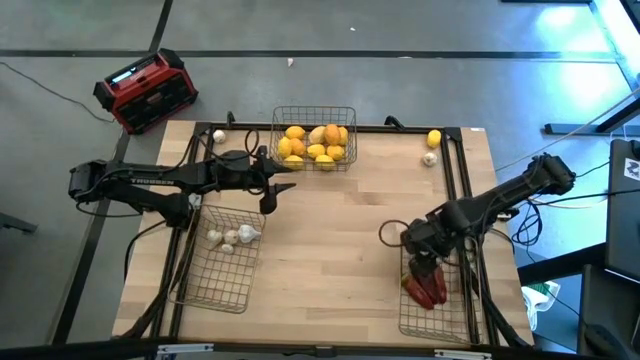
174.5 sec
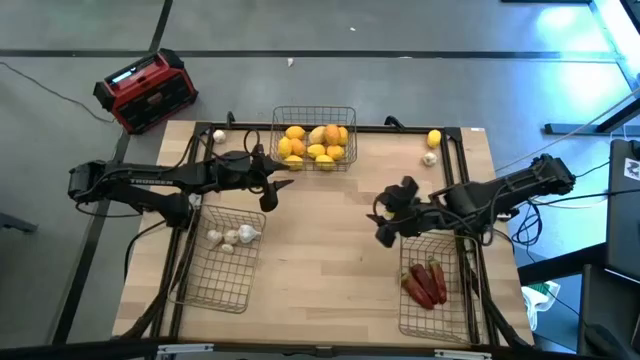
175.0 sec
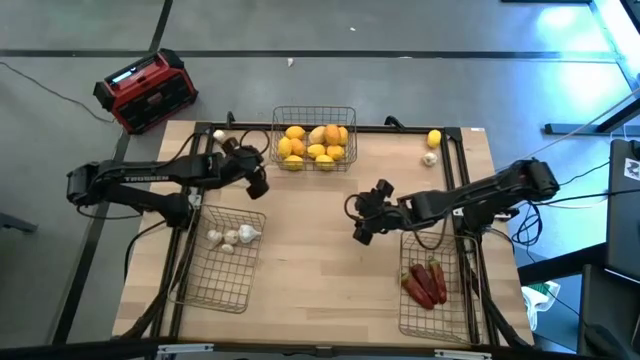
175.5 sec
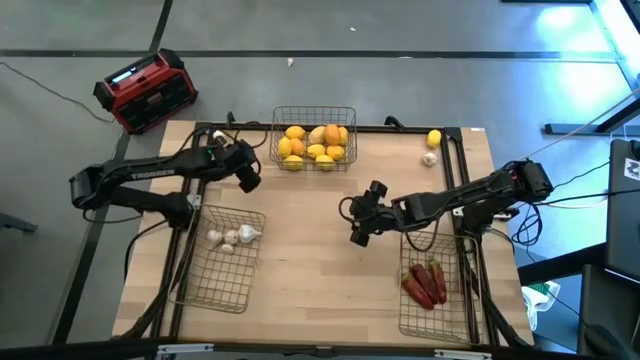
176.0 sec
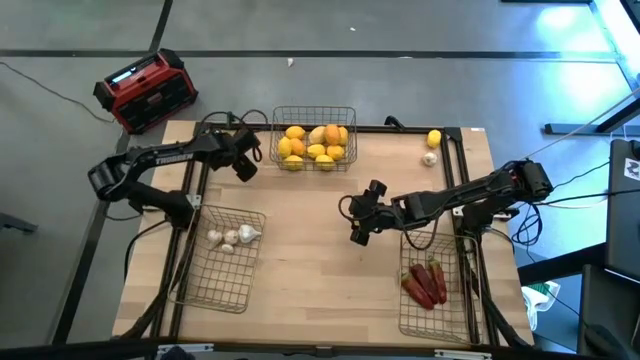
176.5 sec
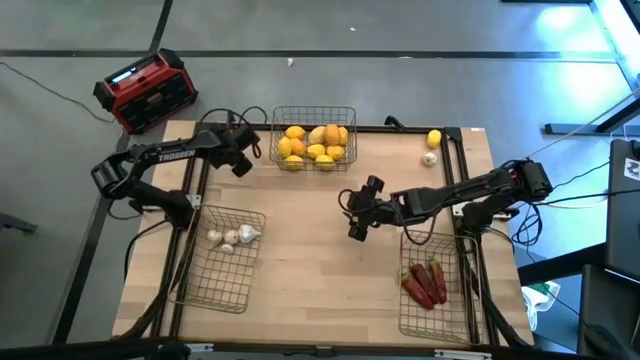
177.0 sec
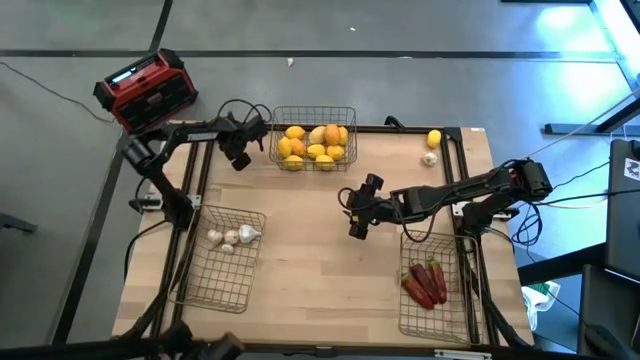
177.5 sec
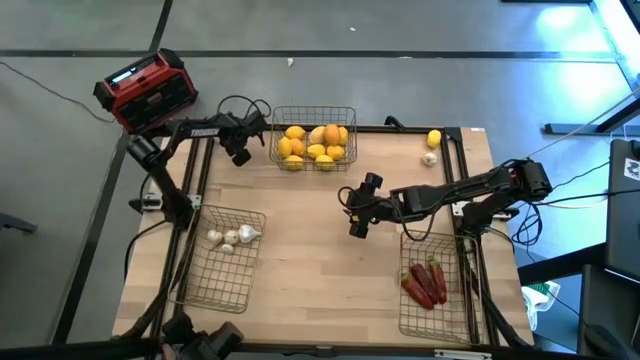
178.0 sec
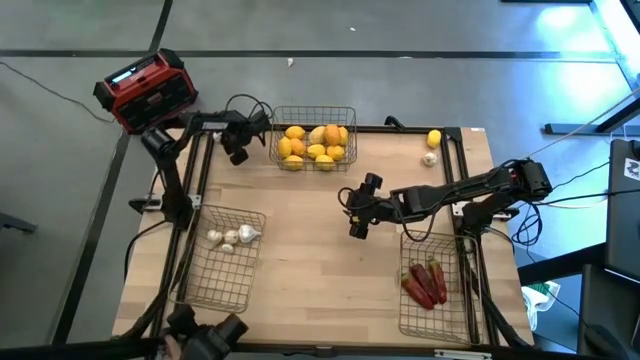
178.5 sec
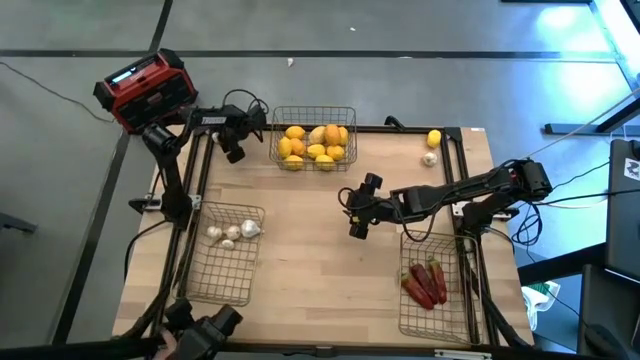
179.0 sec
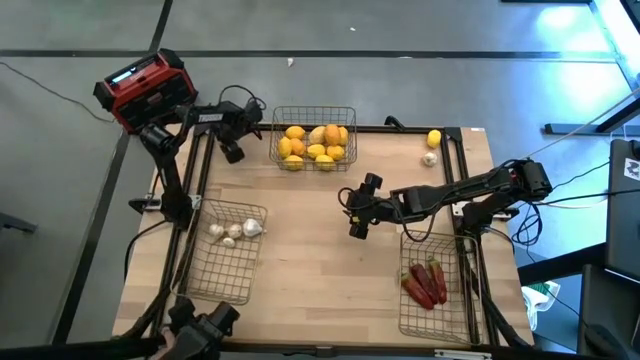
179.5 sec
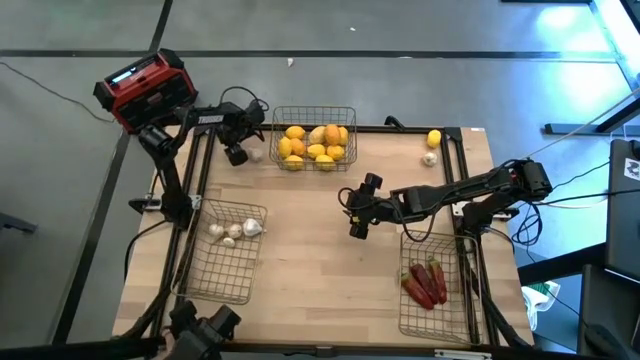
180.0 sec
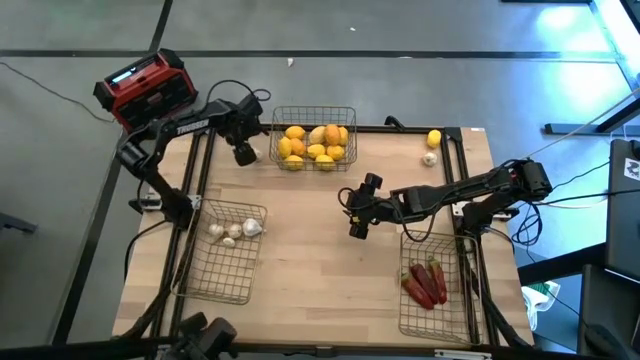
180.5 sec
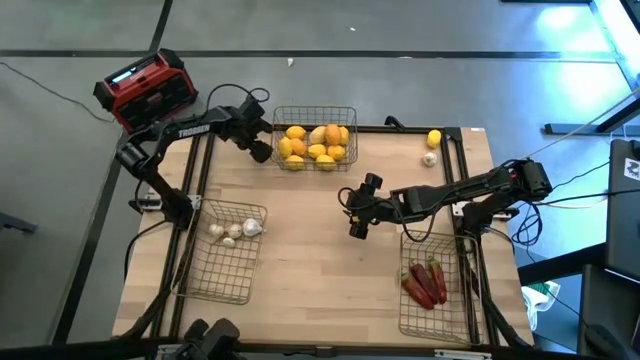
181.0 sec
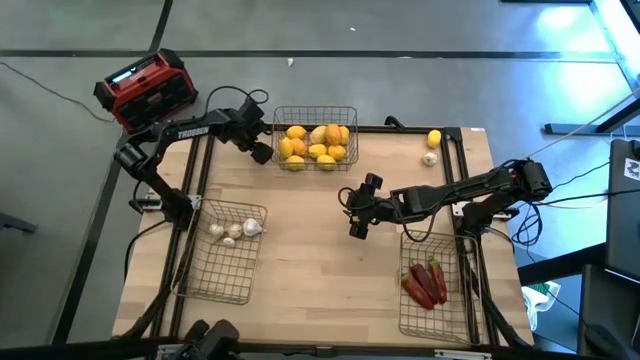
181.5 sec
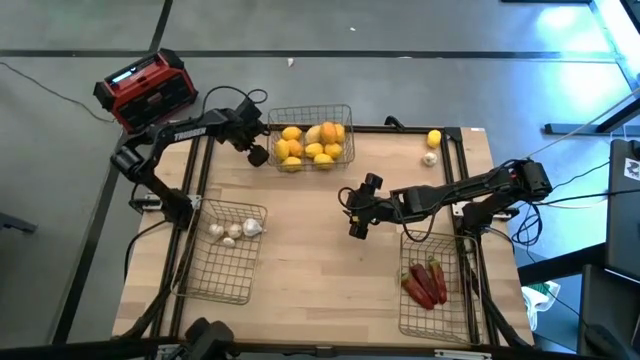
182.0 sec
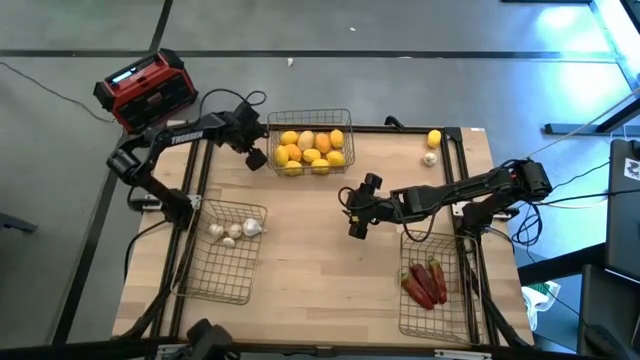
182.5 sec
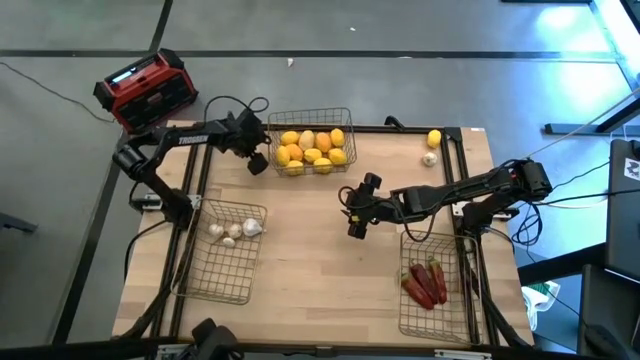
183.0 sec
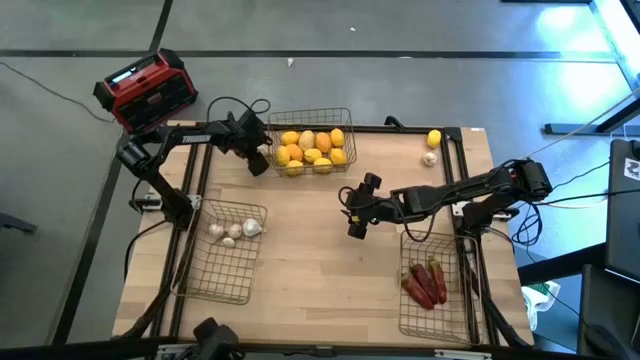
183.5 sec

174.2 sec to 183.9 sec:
Task: Sort produce into baskets
Put the garlic into the bottom left wire basket

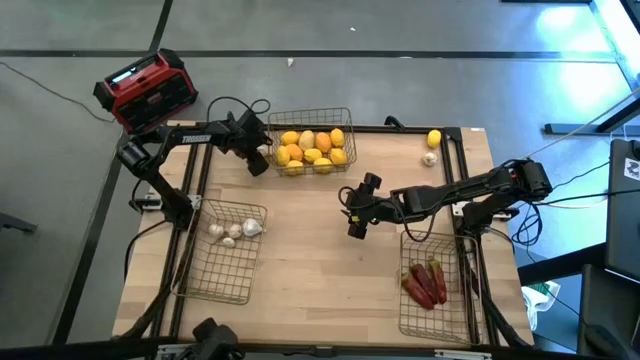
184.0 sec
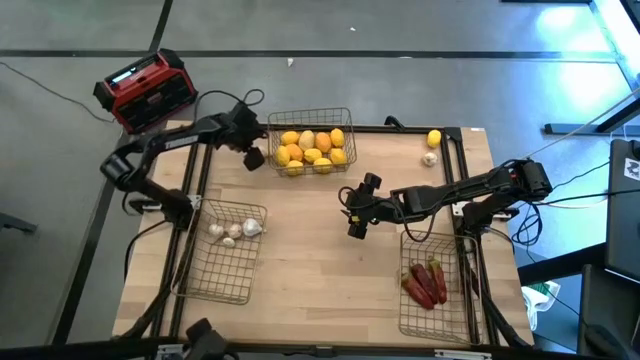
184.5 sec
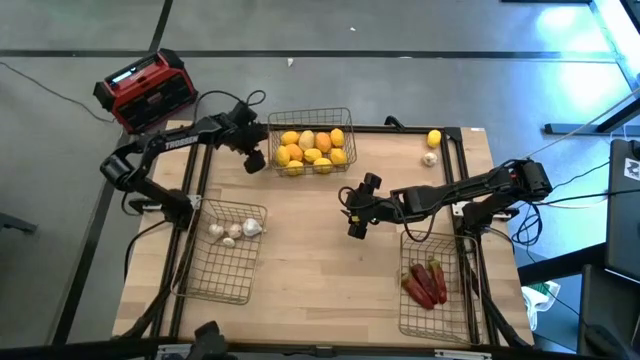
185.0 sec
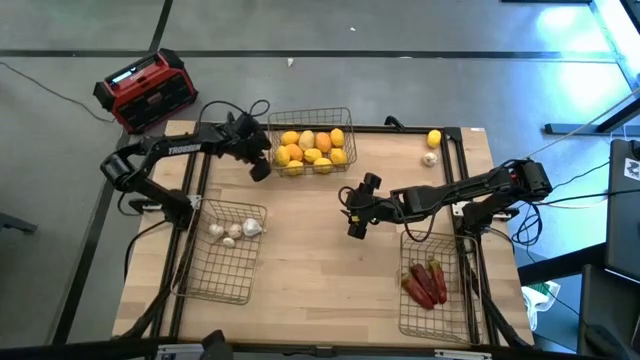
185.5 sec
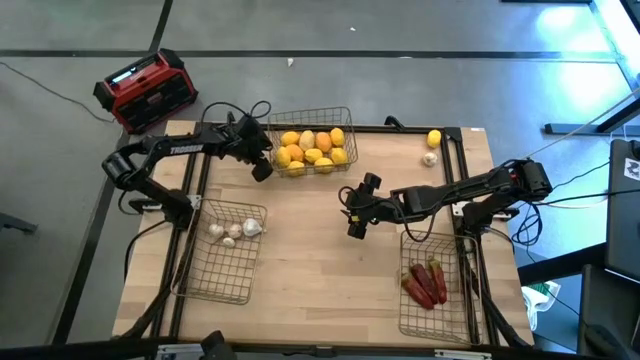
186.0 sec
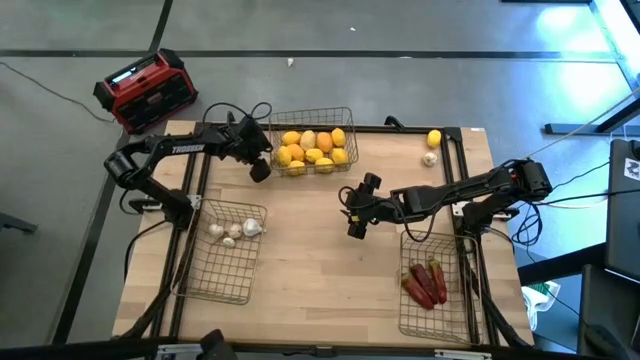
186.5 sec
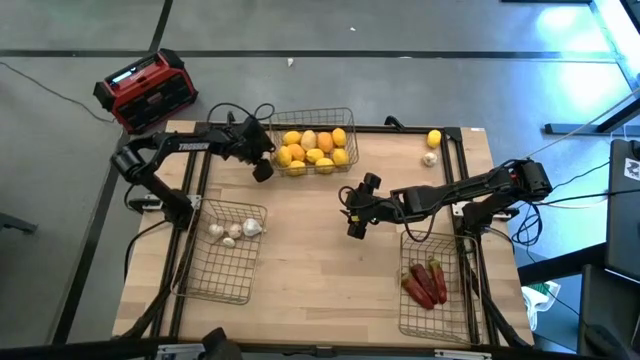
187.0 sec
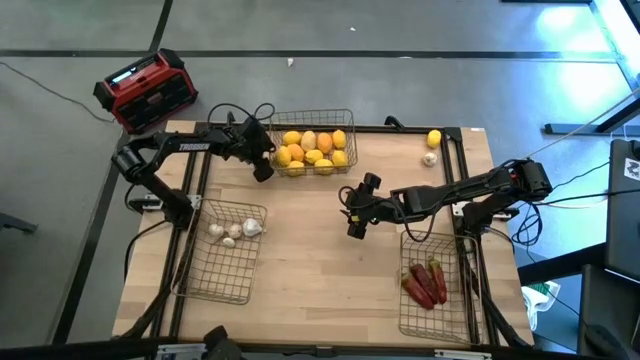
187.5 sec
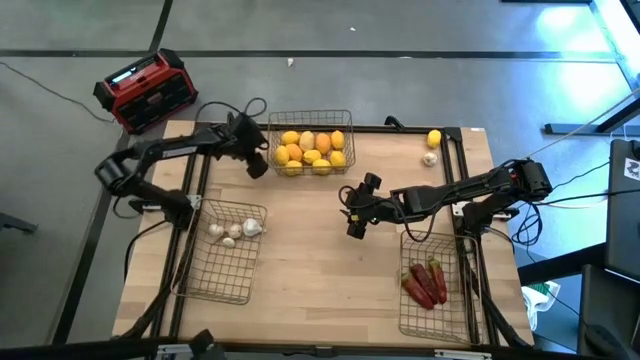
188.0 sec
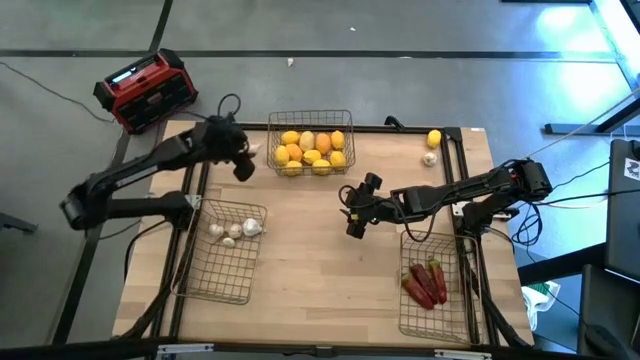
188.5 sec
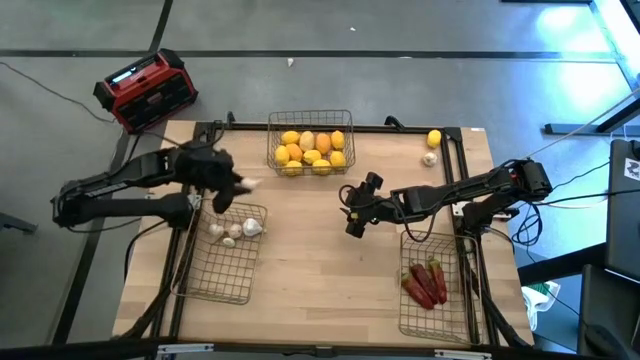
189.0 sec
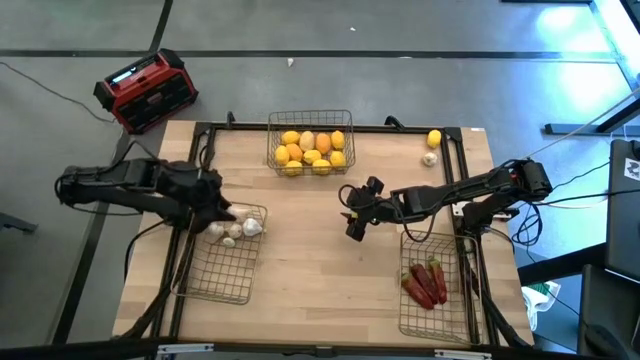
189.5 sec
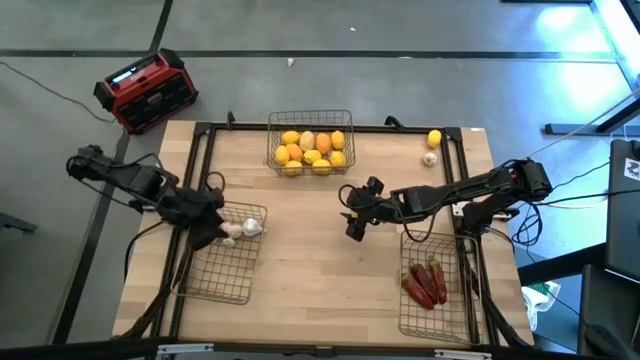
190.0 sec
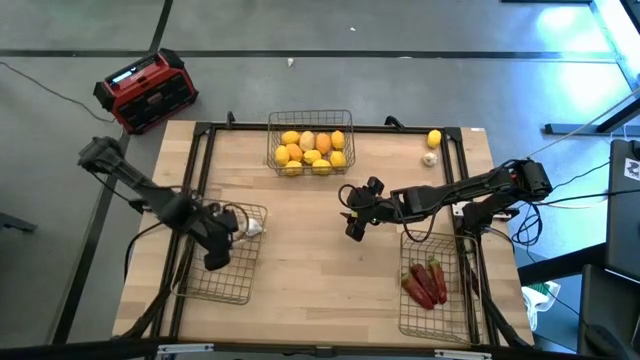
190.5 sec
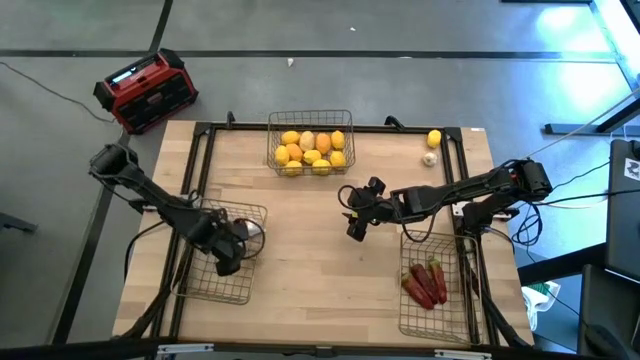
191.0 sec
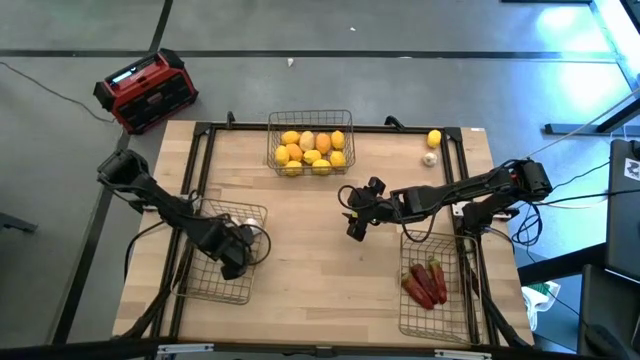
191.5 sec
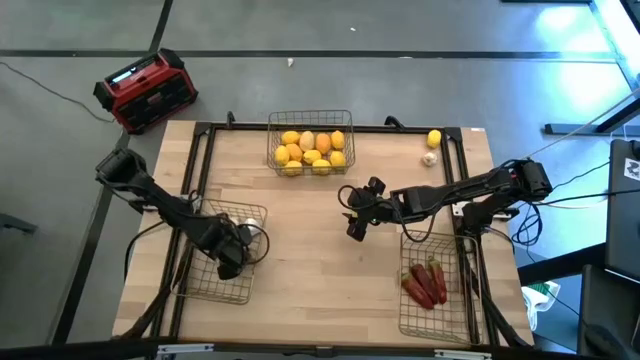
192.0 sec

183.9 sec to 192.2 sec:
Put the garlic into the bottom left wire basket
